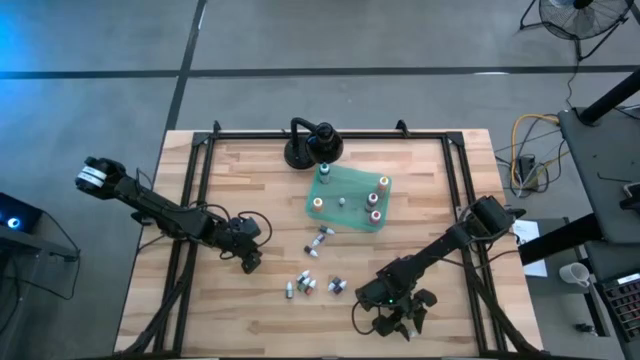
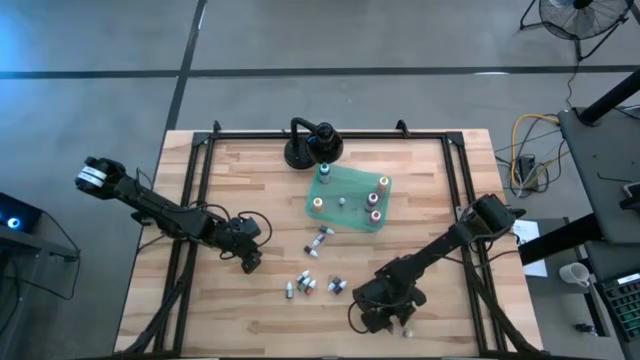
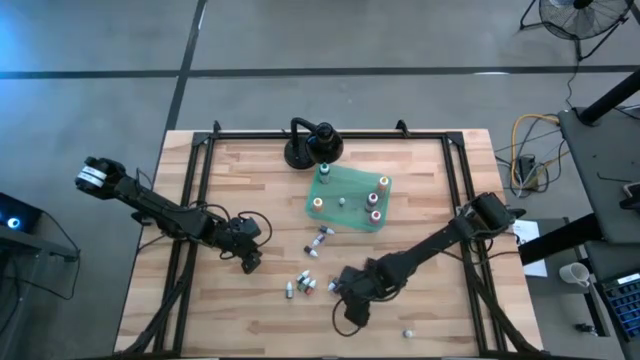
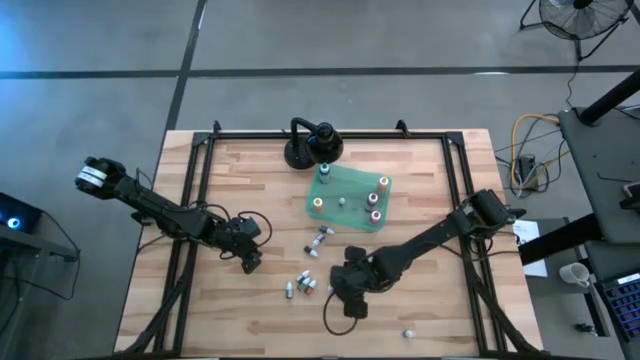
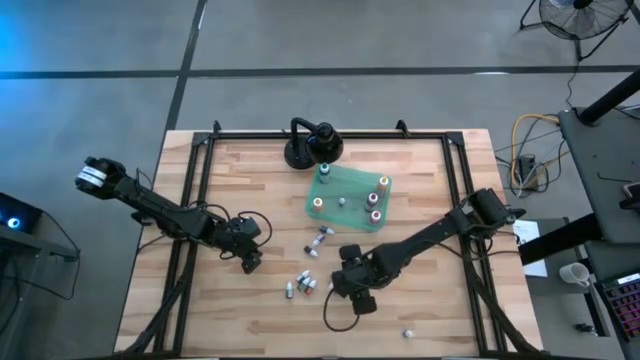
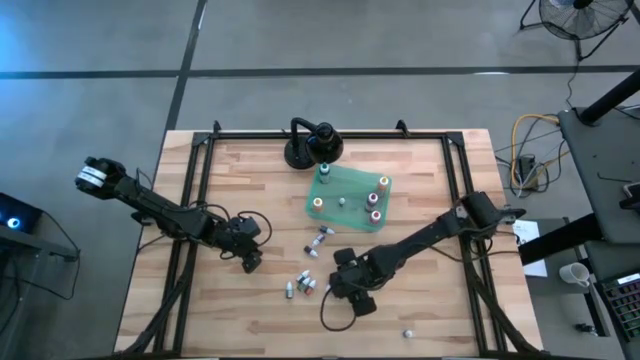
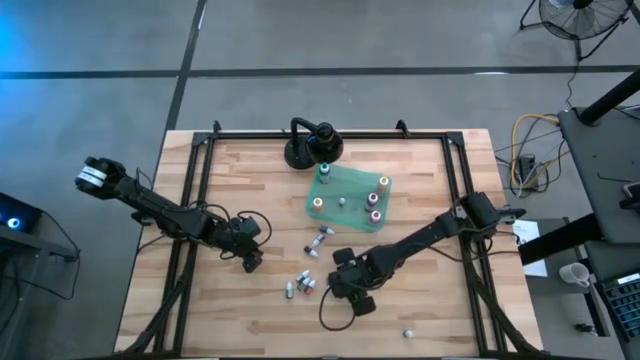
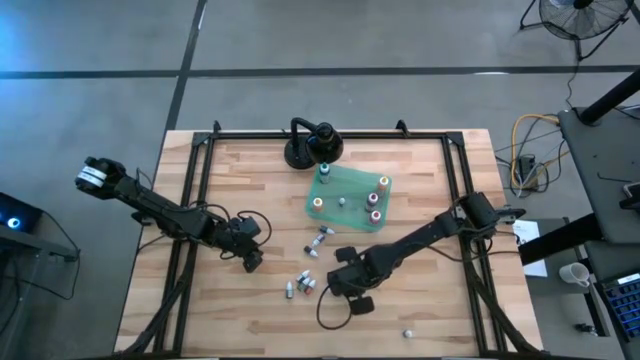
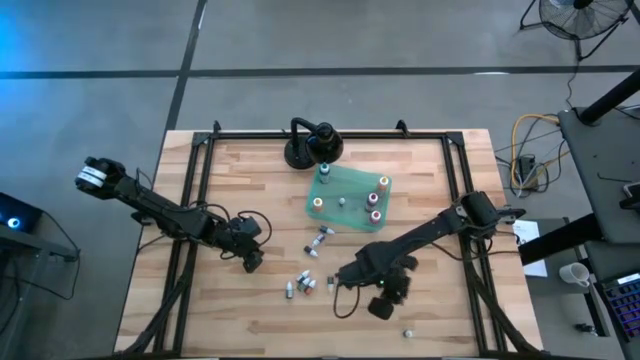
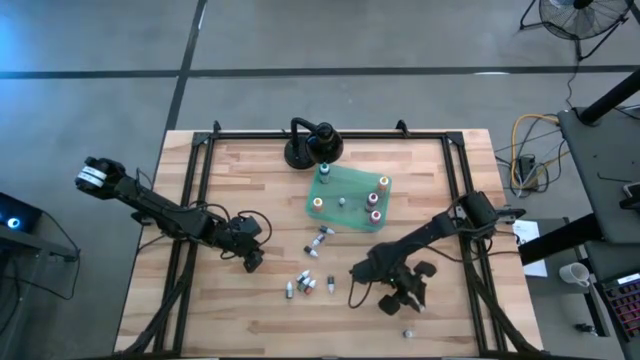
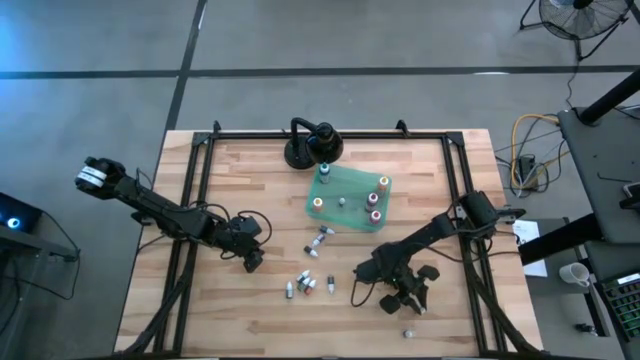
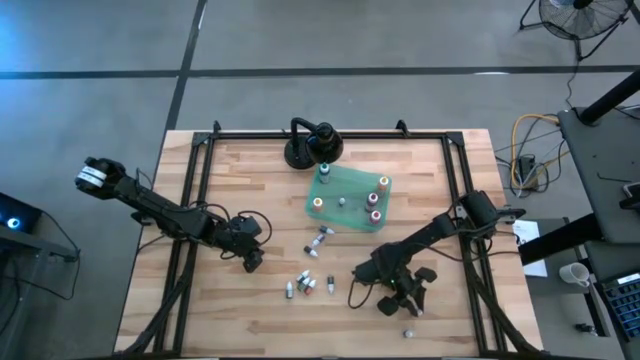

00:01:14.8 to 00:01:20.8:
Task: Pick & Place food coloring
Move the pink food coloring bottle to the bottom right of the table

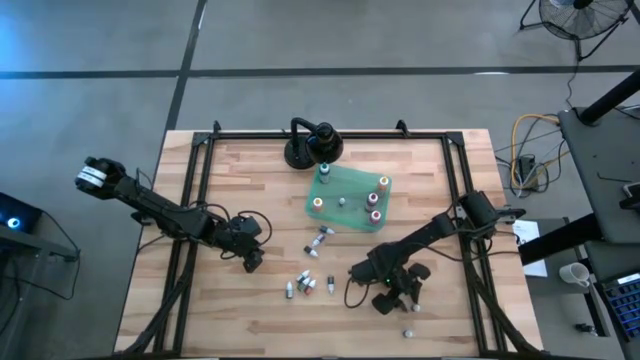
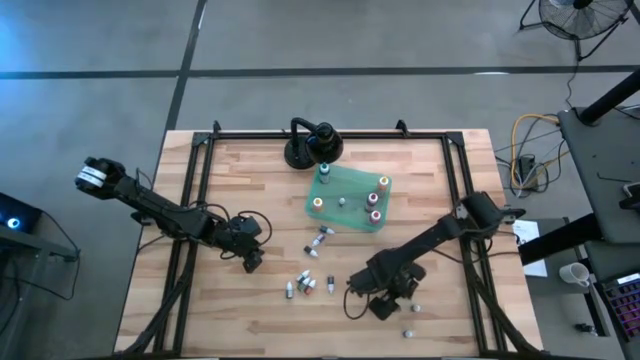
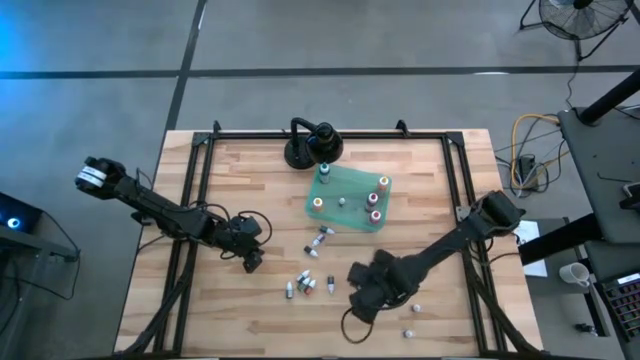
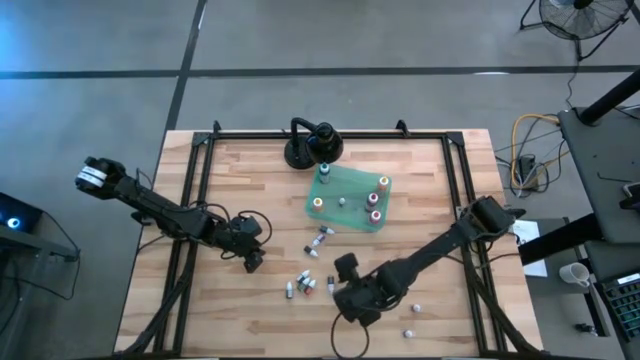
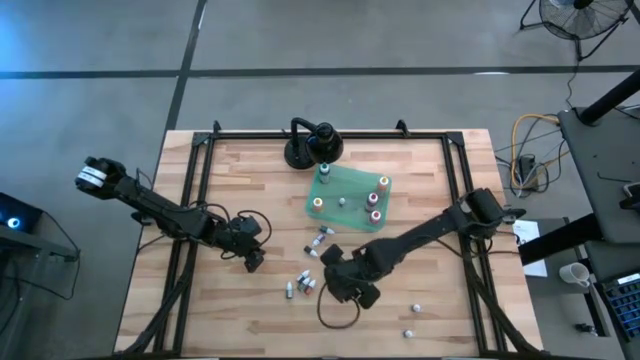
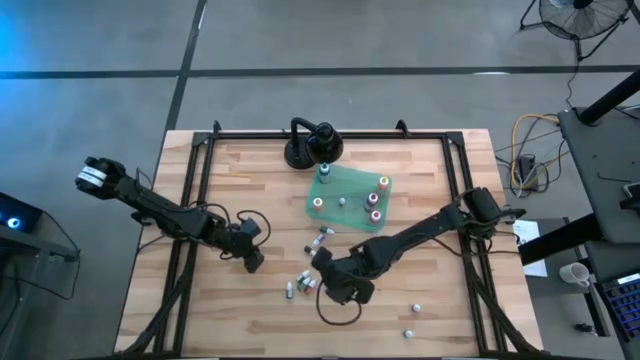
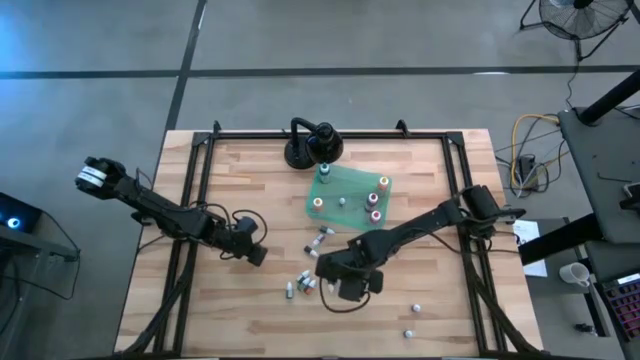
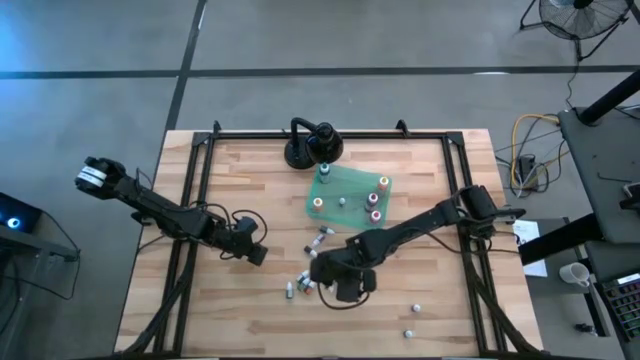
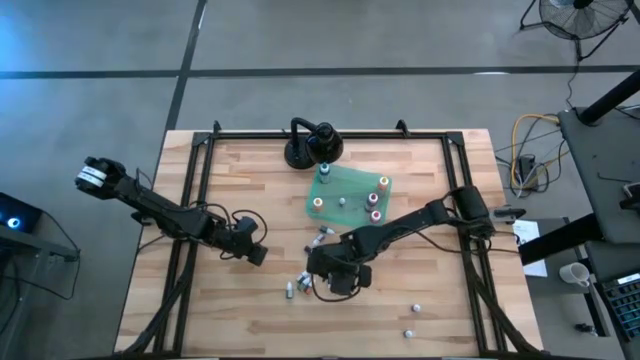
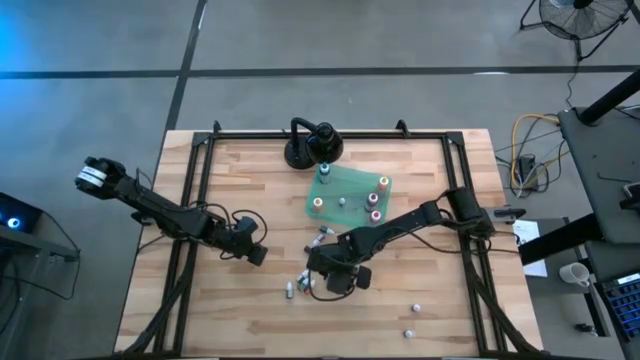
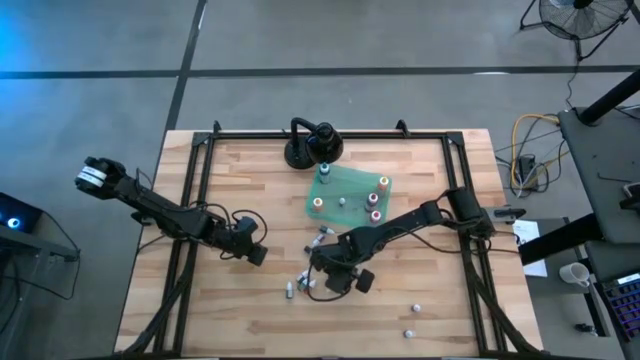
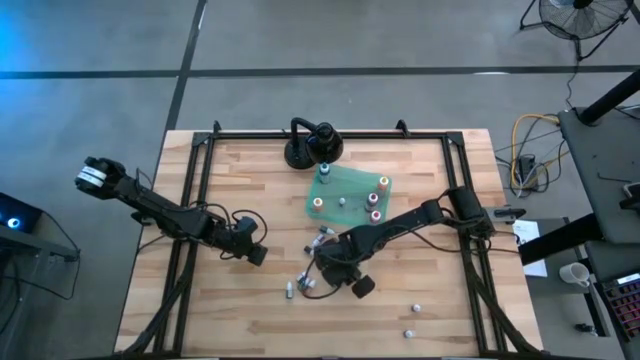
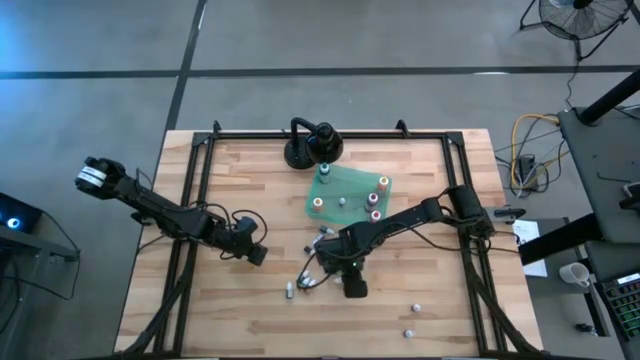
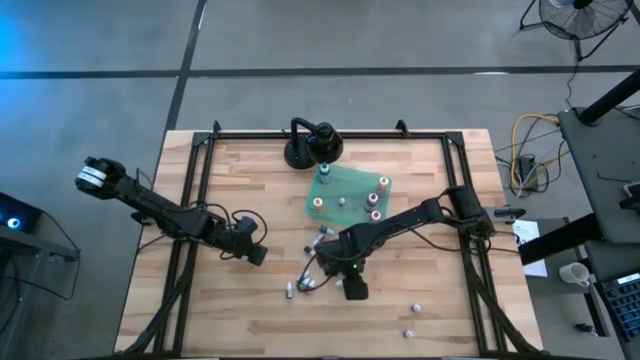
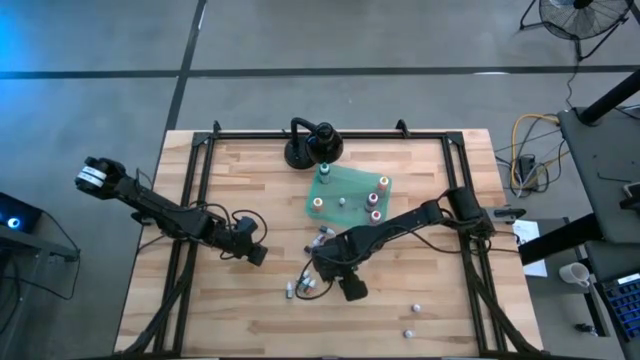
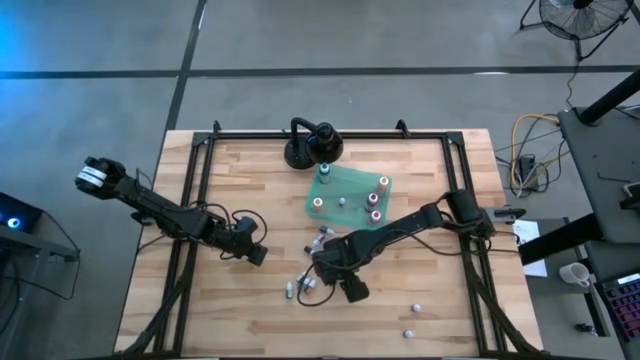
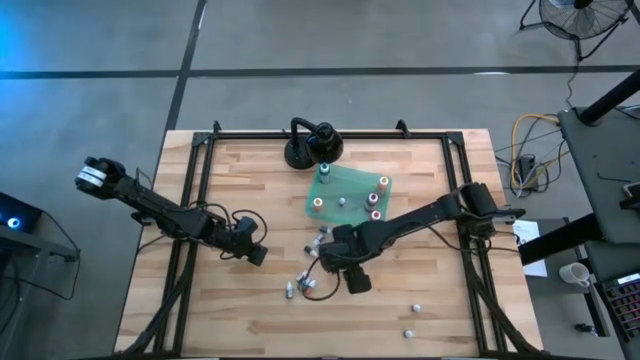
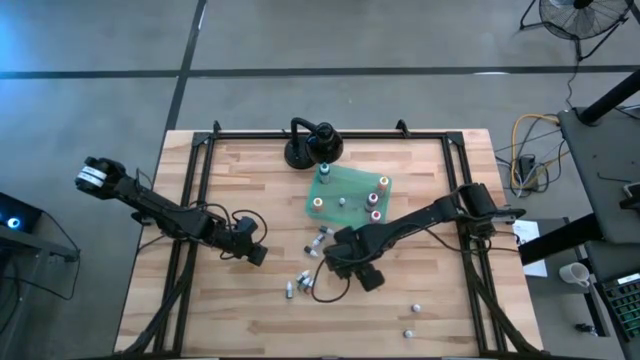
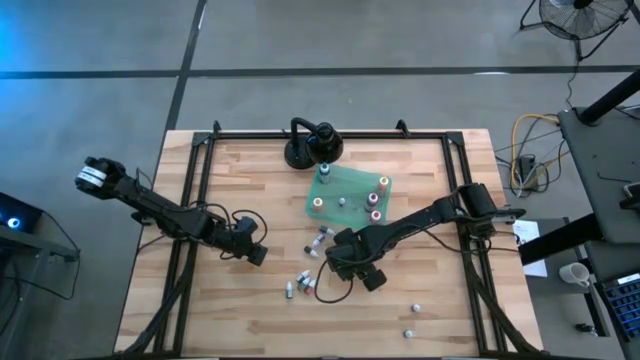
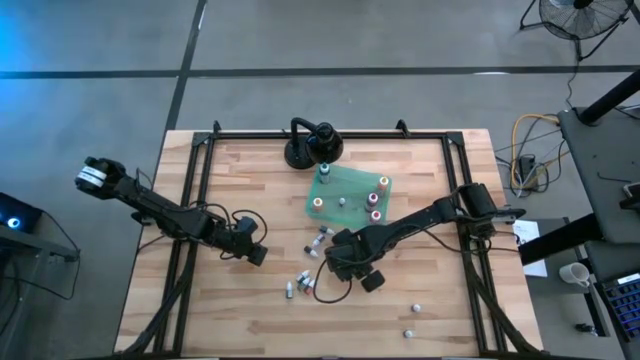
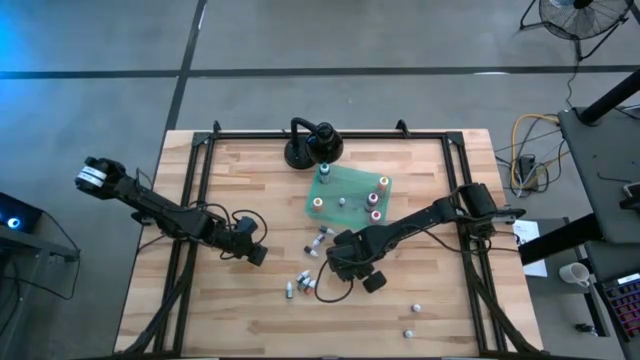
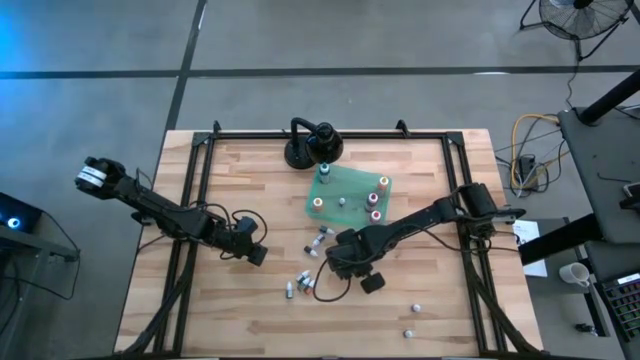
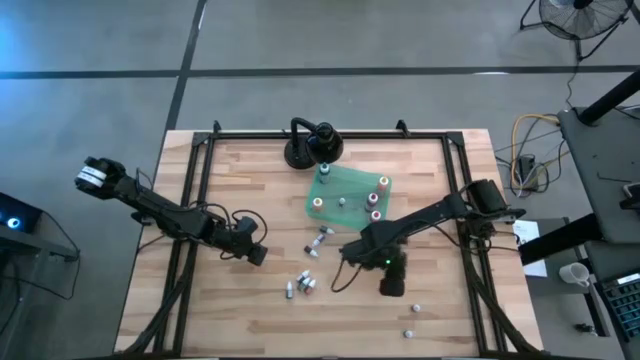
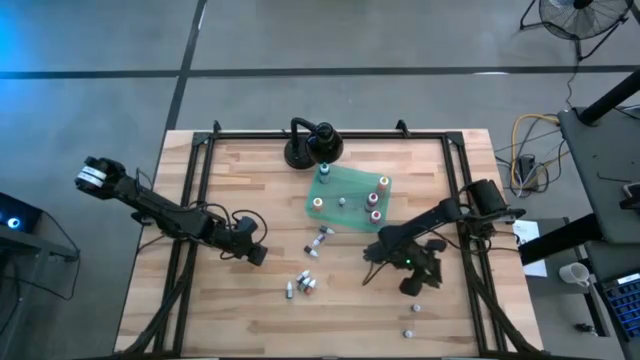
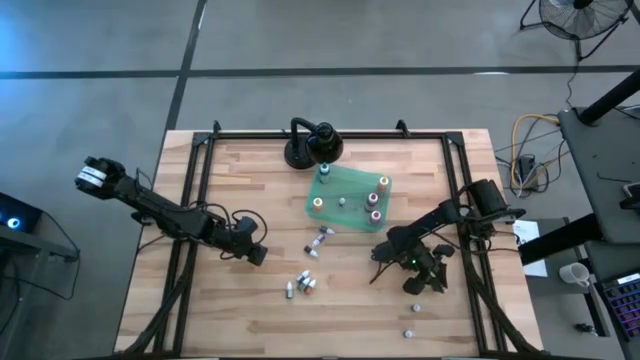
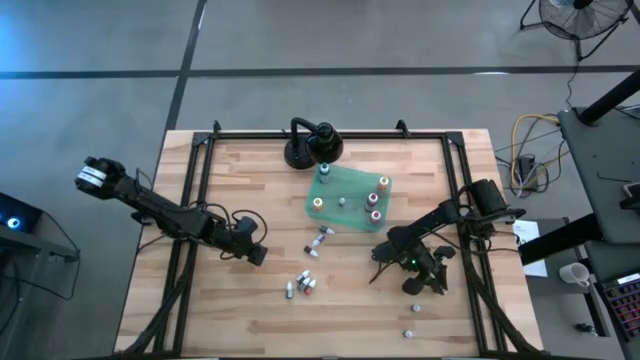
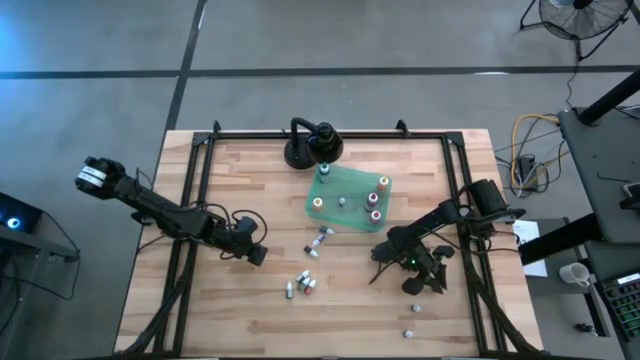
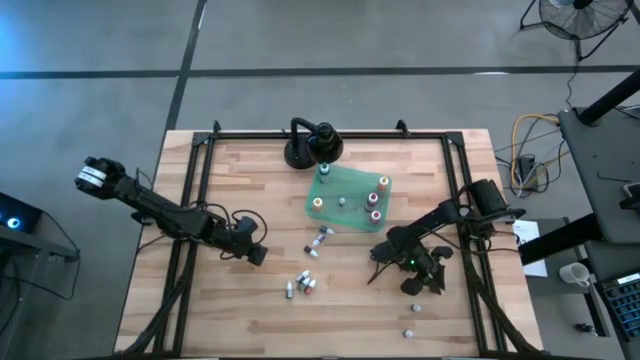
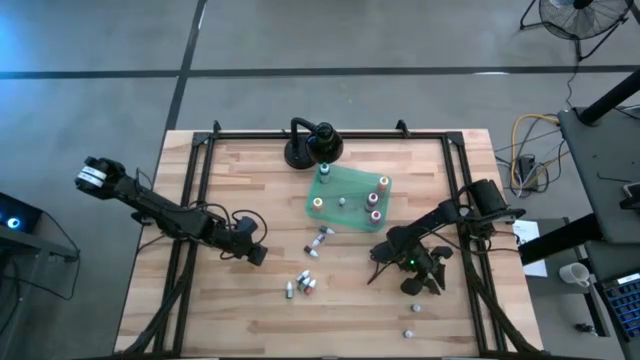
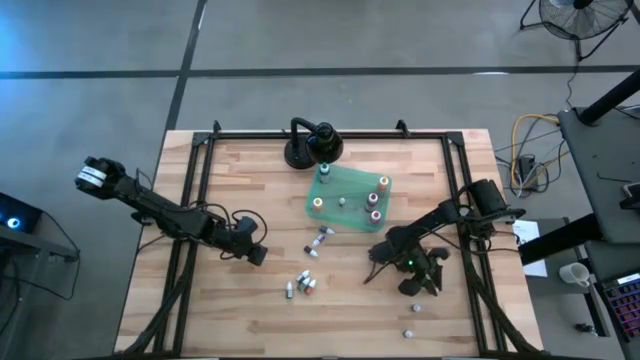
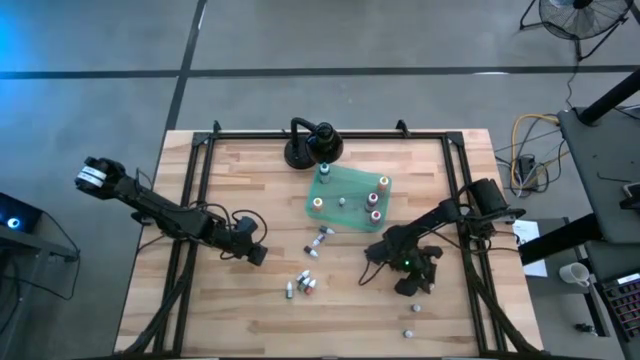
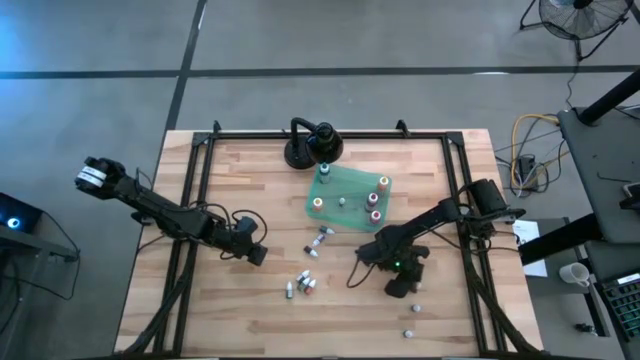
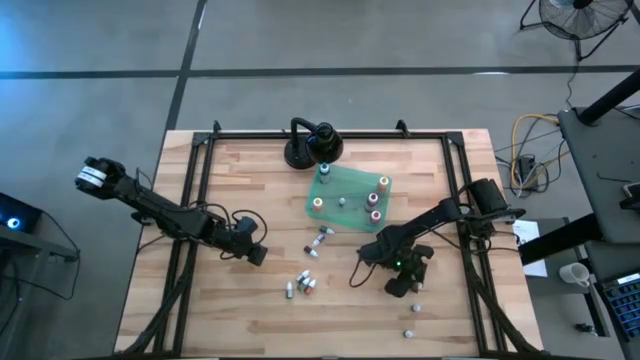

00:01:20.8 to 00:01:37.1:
Move the blue food coloring bottle to the bottom right of the table
